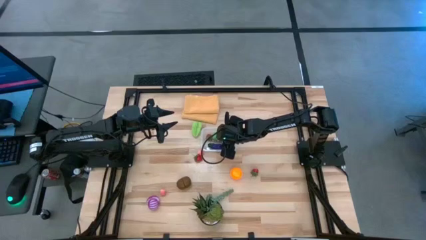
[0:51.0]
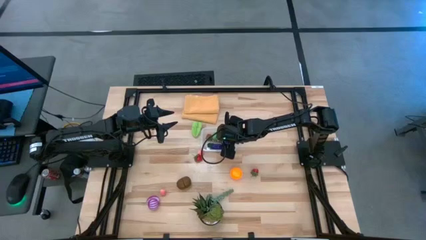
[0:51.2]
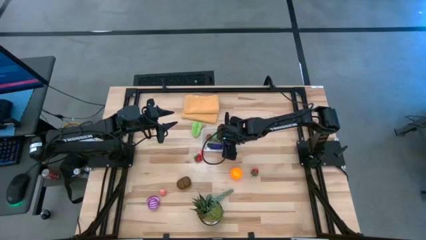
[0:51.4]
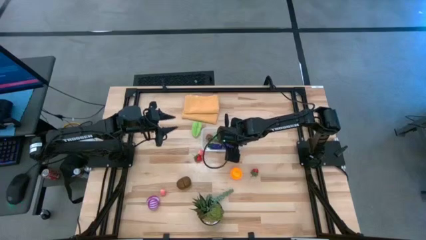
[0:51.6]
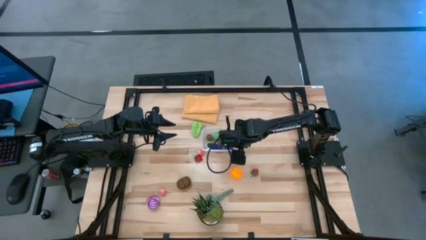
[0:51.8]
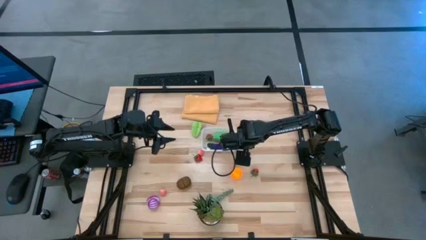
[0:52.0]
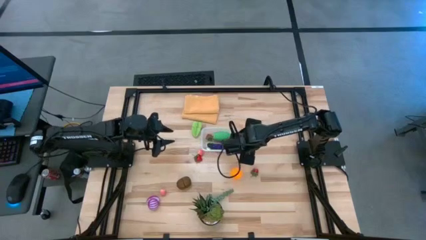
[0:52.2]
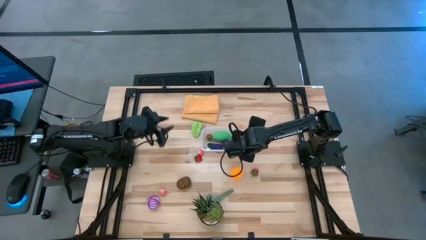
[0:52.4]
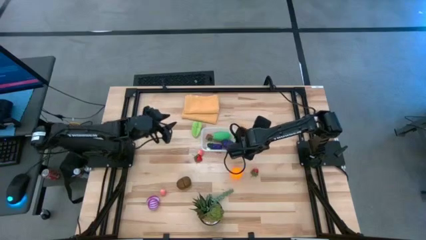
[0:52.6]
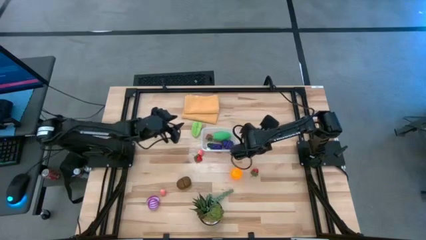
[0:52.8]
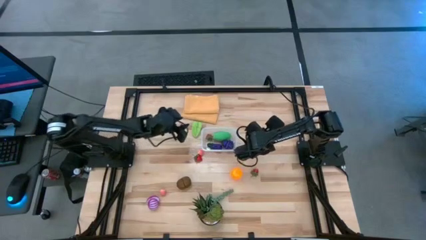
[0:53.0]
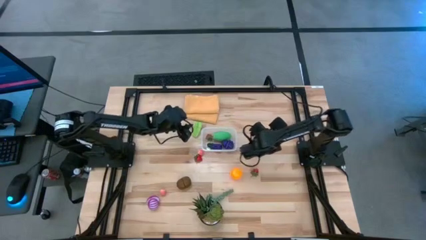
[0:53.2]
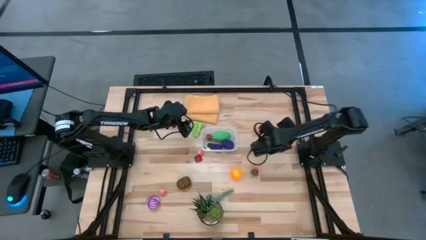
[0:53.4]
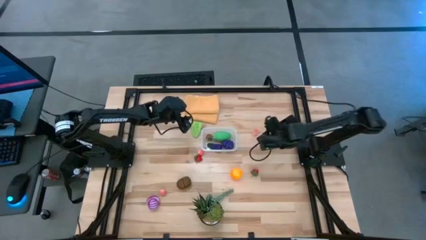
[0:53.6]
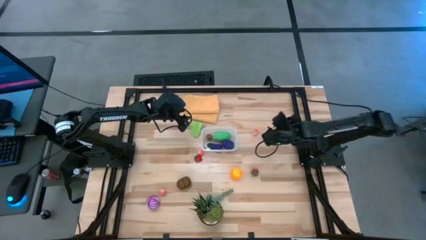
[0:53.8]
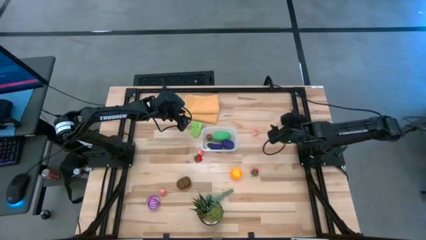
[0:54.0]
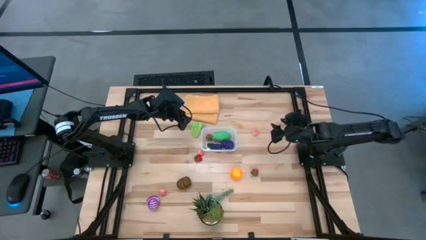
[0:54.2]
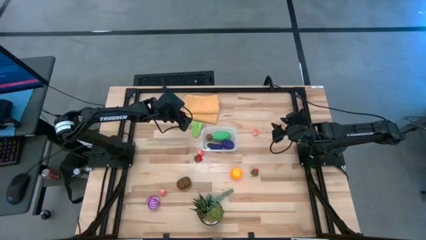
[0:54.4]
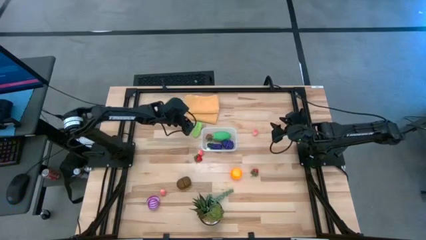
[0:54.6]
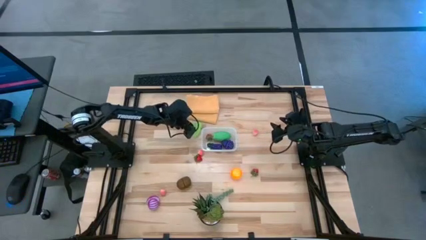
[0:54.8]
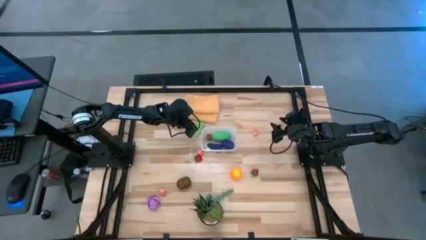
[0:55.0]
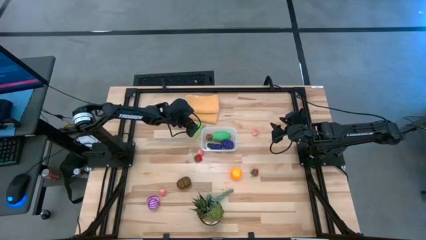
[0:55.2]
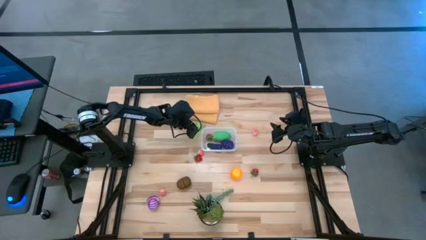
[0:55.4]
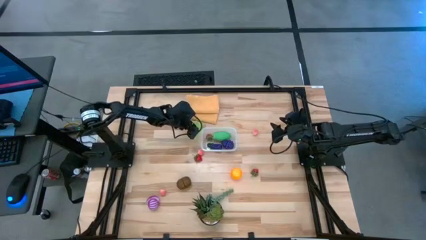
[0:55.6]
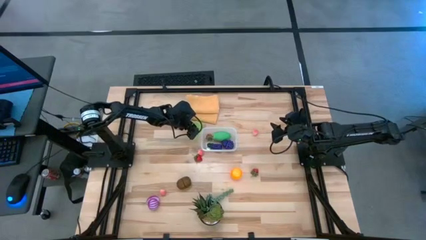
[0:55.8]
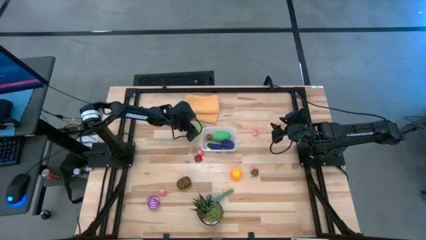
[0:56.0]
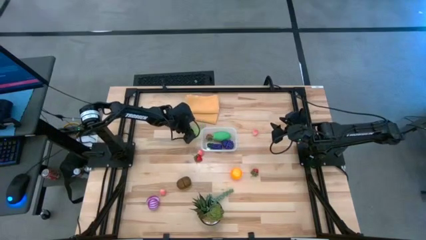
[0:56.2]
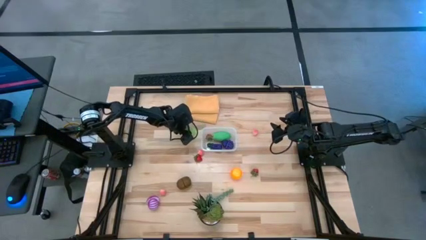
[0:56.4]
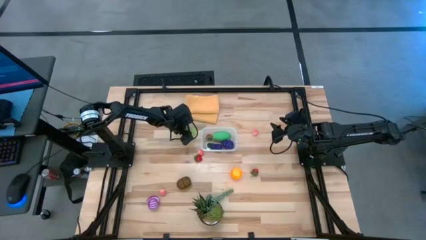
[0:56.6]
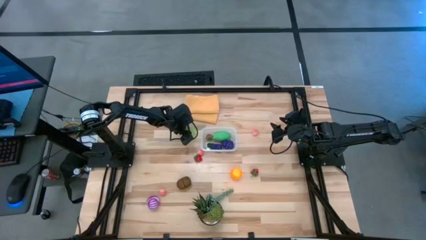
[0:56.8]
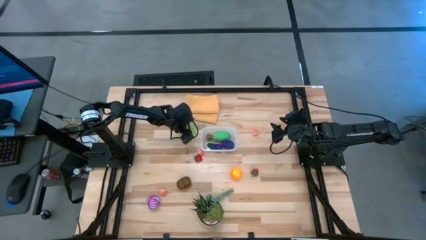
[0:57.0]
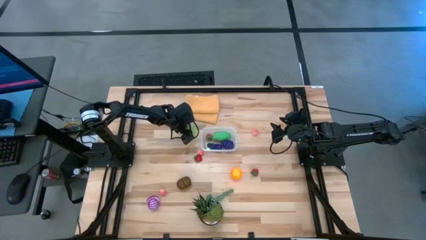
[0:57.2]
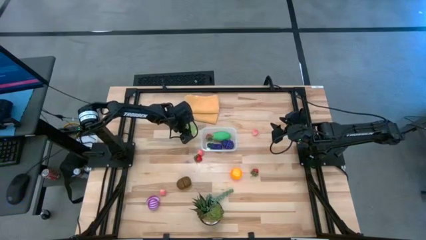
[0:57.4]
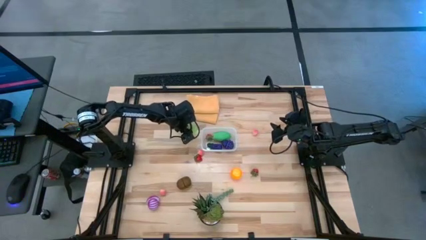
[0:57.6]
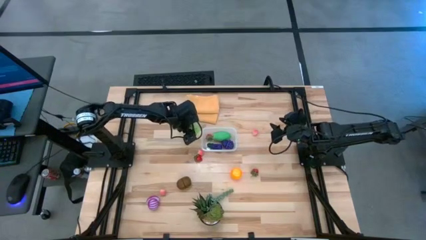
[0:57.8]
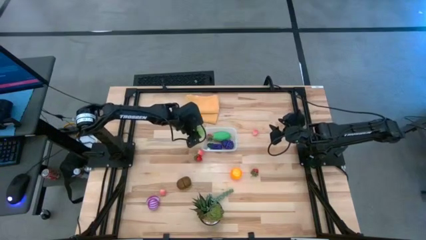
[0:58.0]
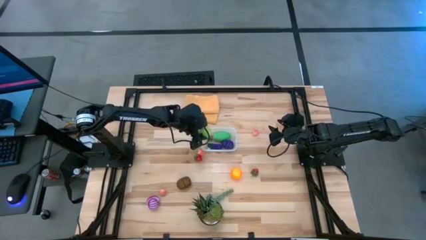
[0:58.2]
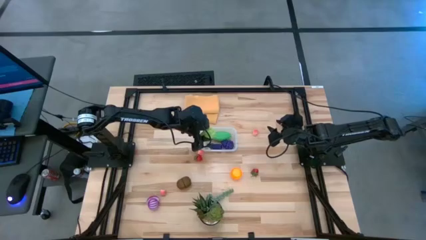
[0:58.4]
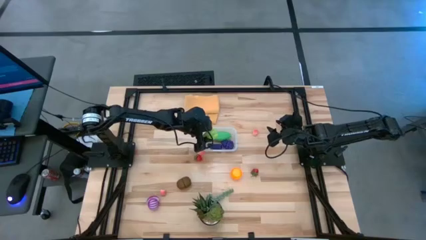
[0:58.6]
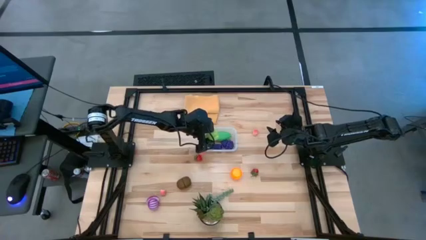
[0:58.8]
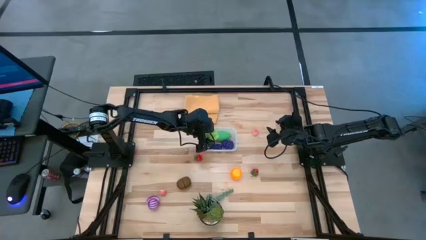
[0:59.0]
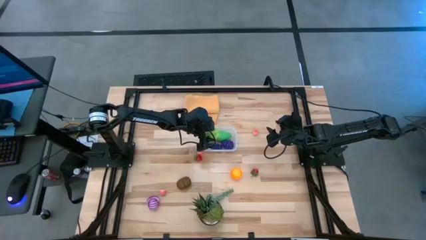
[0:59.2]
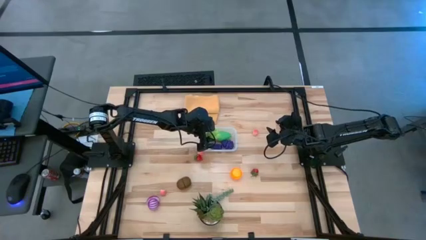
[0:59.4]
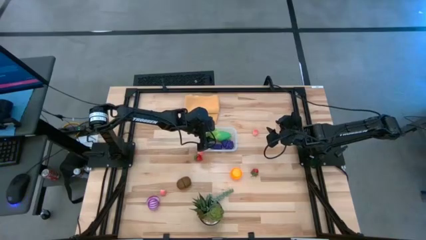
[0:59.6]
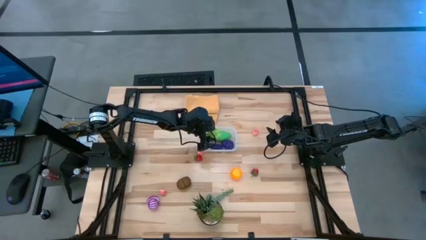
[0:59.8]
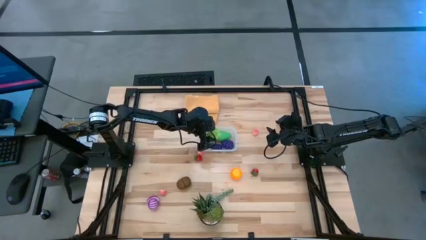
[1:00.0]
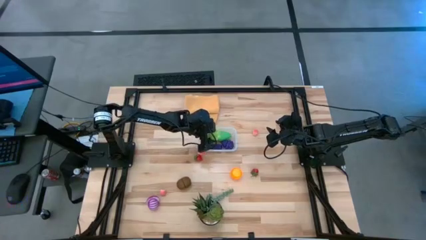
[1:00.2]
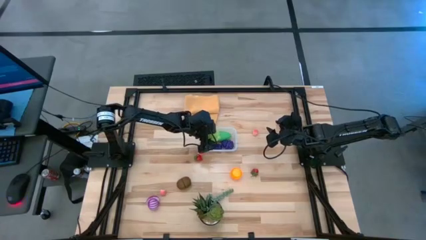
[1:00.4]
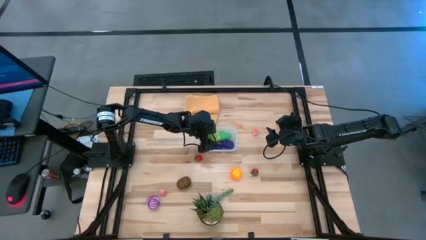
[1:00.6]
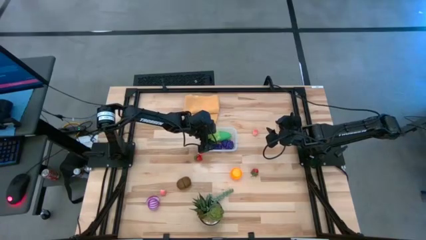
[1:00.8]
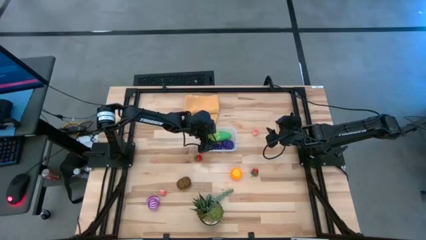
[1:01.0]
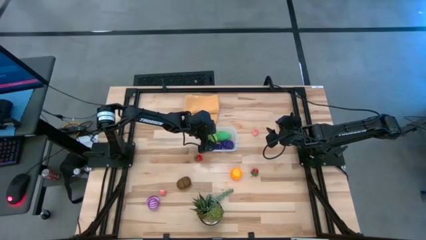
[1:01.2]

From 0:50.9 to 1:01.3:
Task: Pick and placing Produce into tupperware
Put the green star fruit into the transparent container

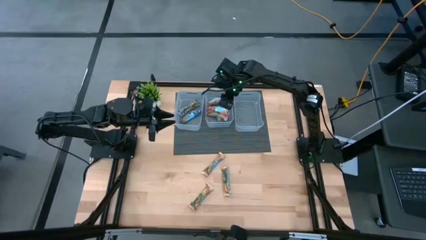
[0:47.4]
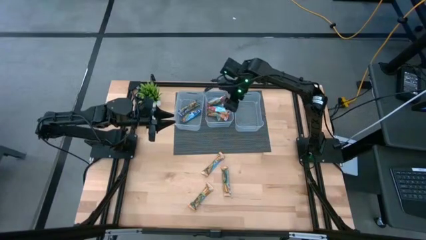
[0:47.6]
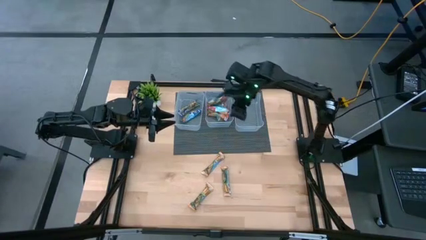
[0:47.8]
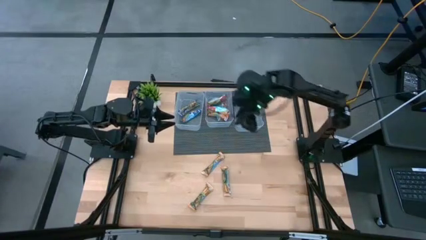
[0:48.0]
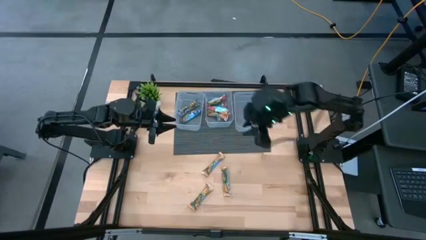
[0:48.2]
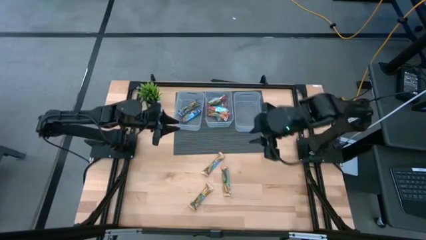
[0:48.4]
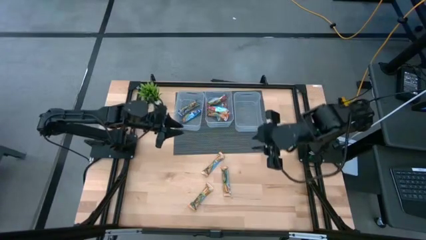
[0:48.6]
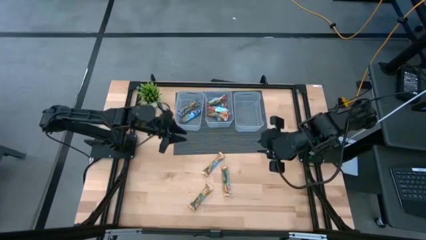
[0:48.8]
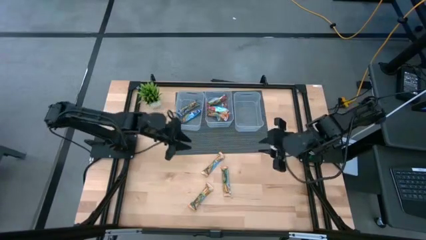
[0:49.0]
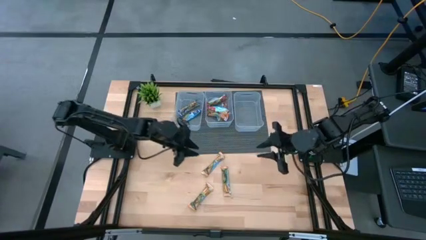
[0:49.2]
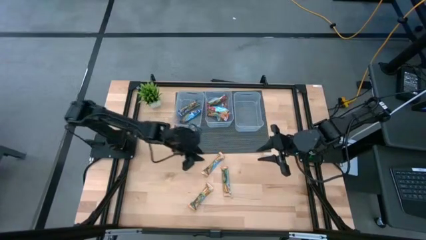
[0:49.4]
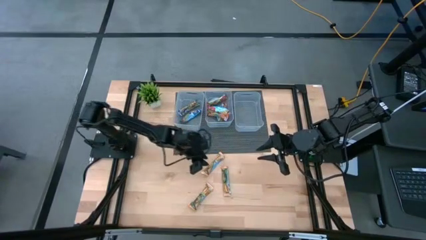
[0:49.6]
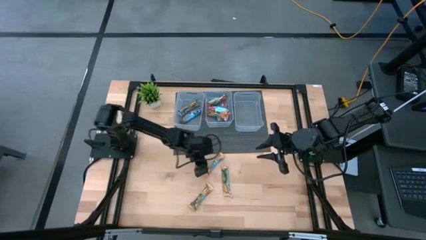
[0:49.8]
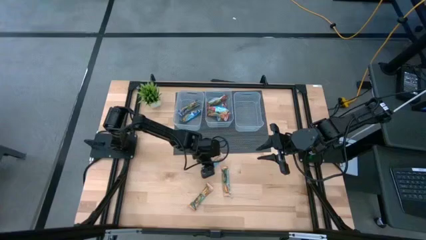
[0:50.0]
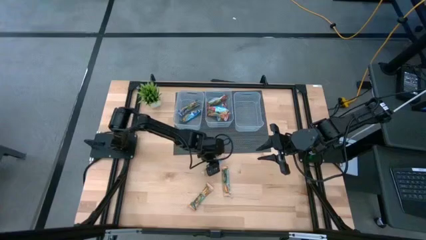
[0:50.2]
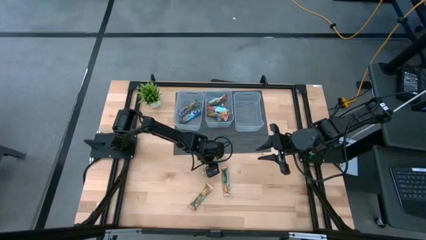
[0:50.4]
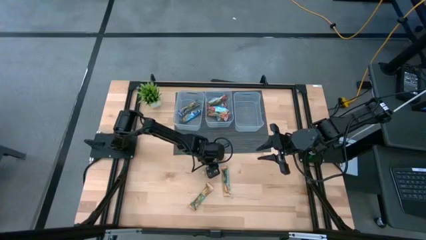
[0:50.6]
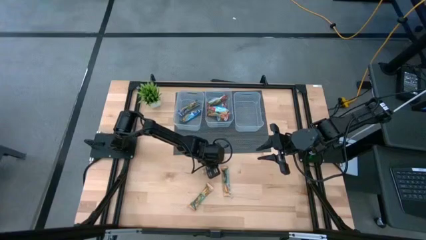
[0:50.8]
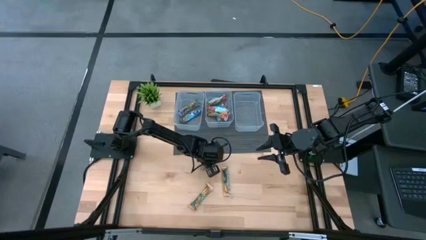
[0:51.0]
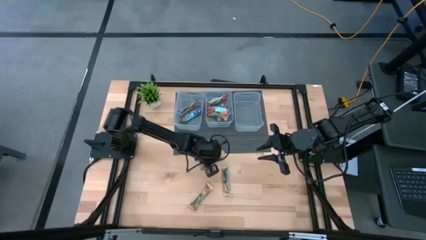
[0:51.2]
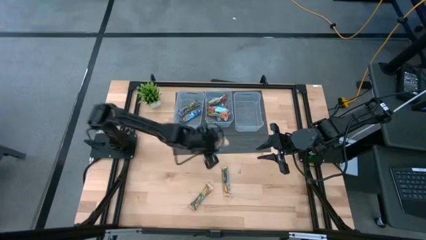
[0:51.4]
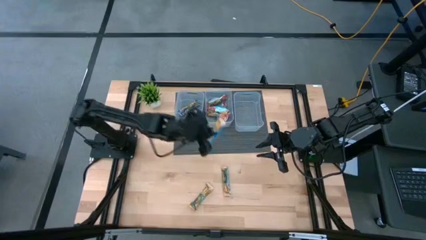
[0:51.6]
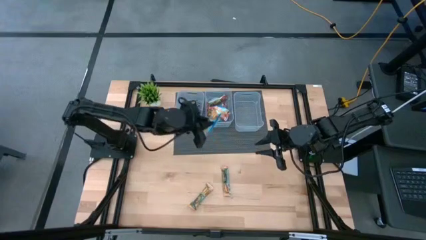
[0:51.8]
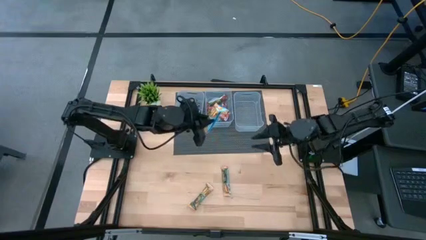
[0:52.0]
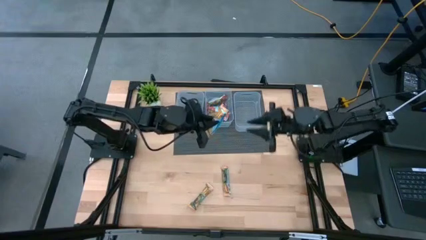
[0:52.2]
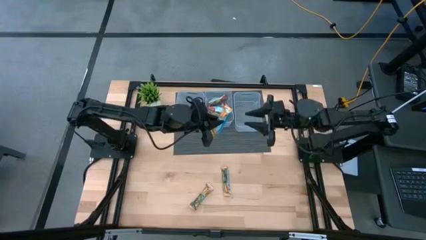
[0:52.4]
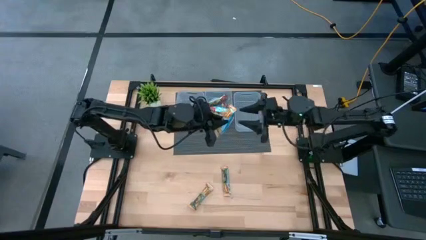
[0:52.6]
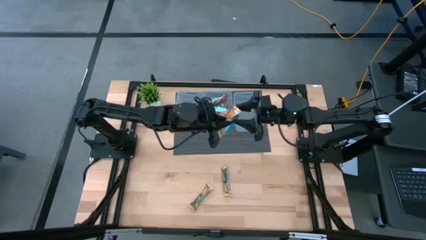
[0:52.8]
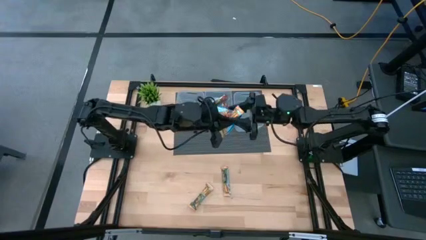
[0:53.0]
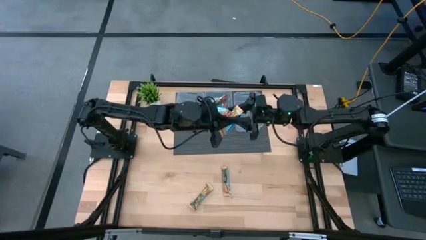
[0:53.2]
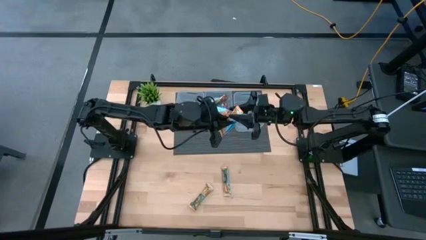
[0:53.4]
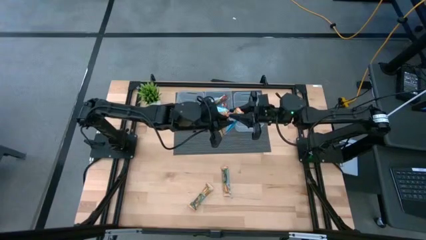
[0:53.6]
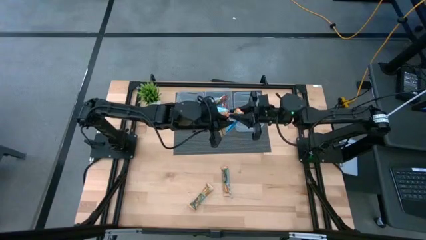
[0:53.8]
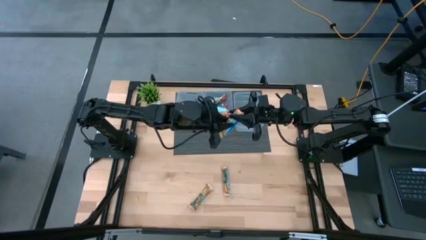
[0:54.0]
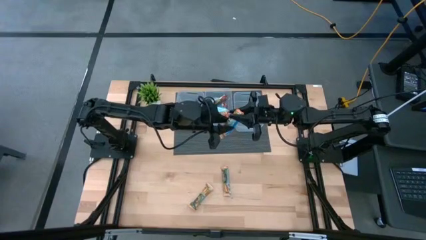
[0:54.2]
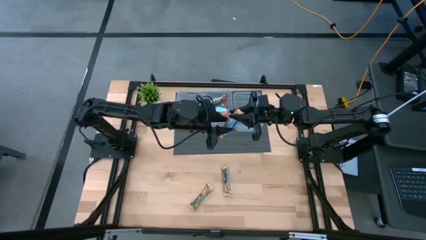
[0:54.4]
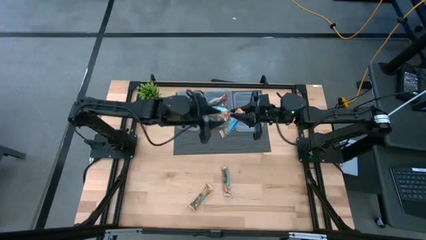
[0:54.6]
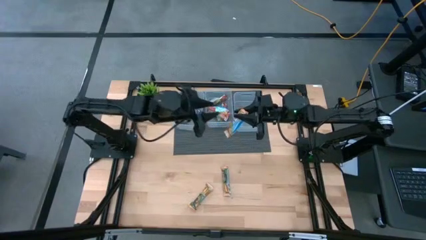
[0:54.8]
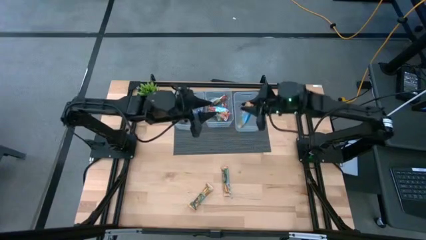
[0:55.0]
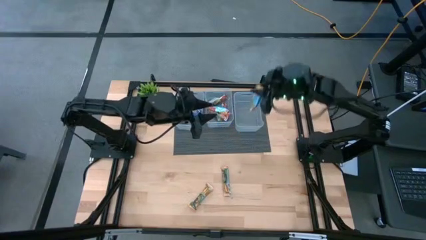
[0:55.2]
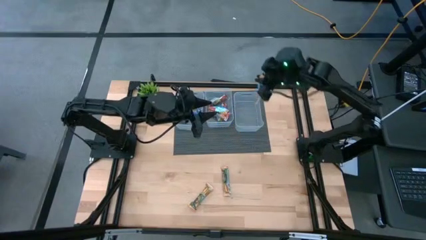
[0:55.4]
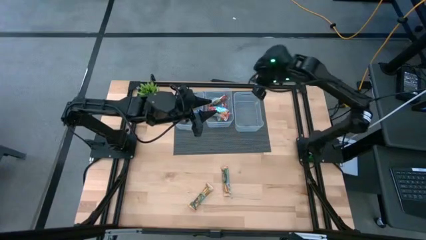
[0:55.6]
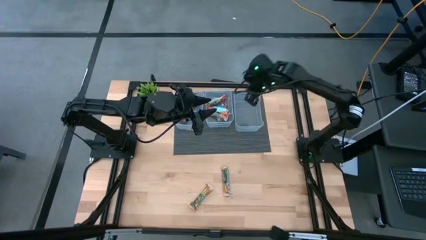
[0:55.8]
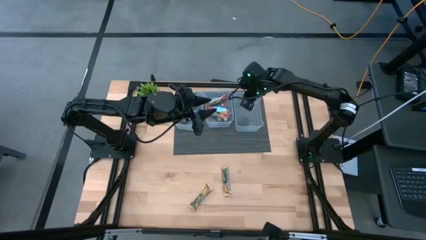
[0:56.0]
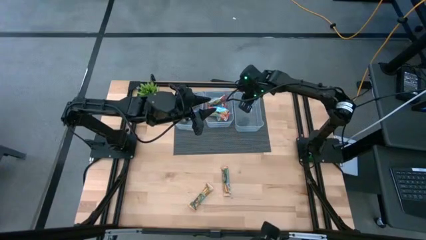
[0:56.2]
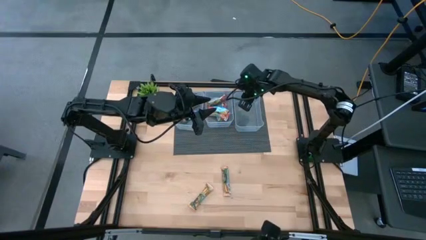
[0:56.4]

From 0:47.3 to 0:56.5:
Task: Pick and place Granola Bars by type
Put the yellow granola bar into the right transparent bin
